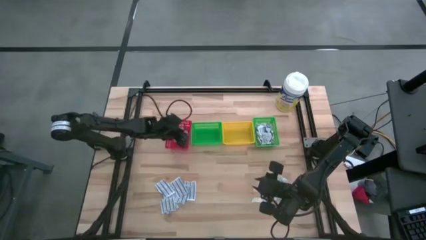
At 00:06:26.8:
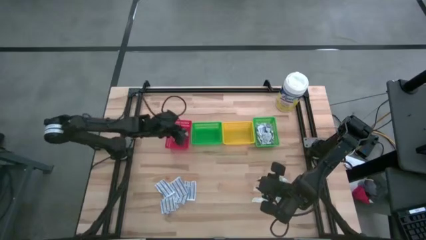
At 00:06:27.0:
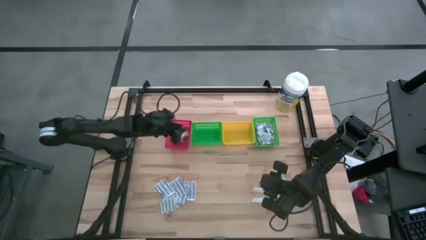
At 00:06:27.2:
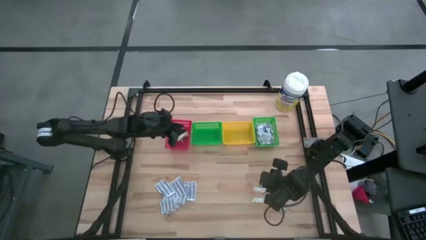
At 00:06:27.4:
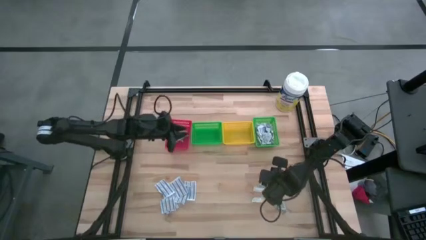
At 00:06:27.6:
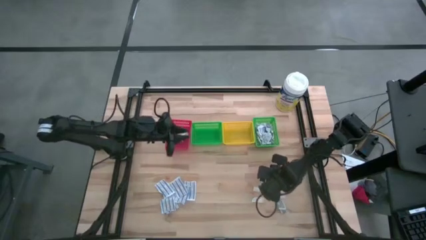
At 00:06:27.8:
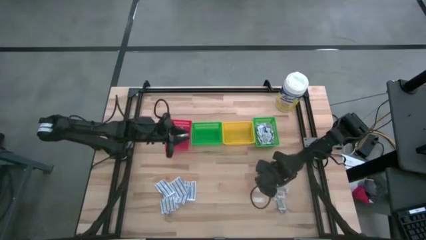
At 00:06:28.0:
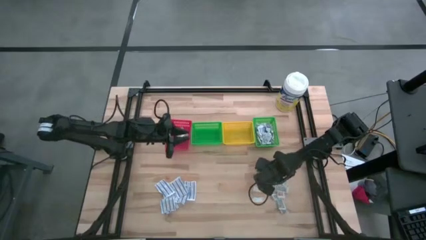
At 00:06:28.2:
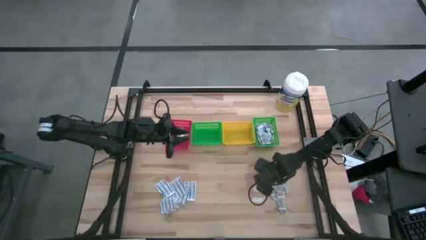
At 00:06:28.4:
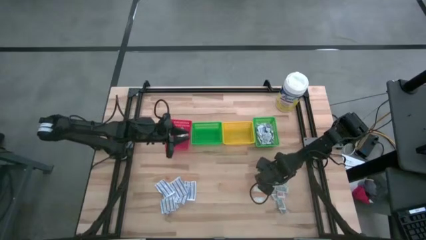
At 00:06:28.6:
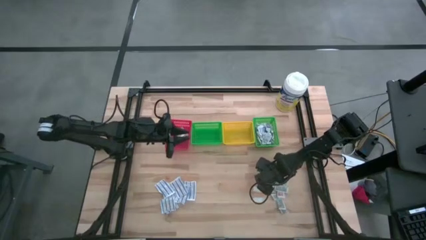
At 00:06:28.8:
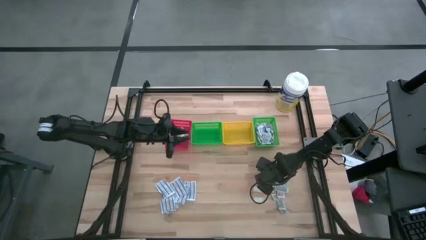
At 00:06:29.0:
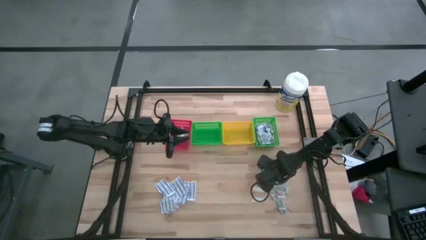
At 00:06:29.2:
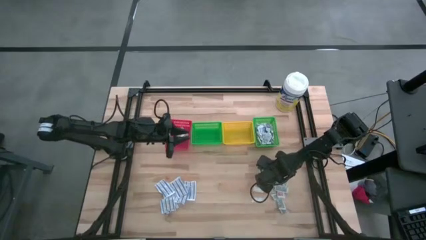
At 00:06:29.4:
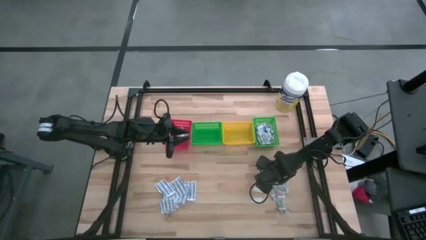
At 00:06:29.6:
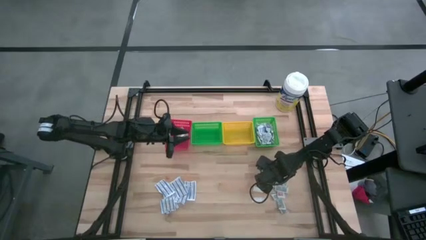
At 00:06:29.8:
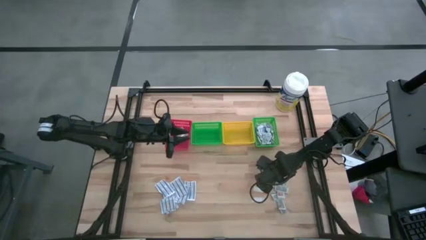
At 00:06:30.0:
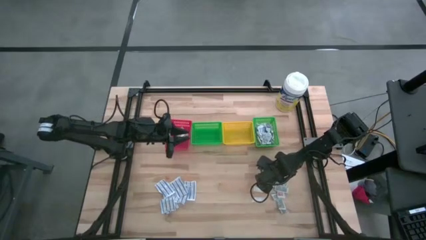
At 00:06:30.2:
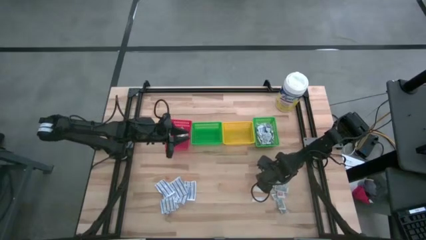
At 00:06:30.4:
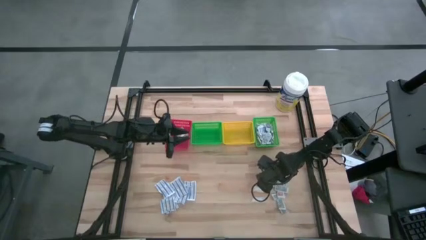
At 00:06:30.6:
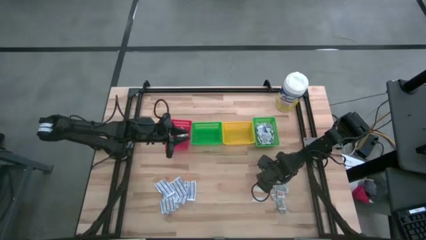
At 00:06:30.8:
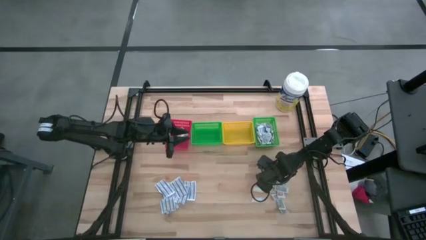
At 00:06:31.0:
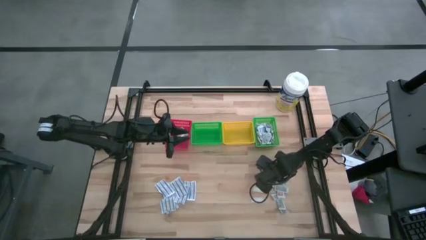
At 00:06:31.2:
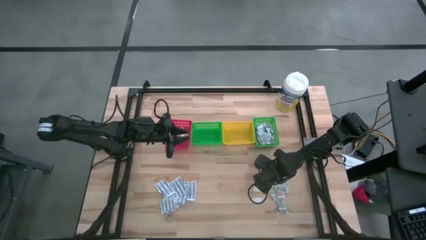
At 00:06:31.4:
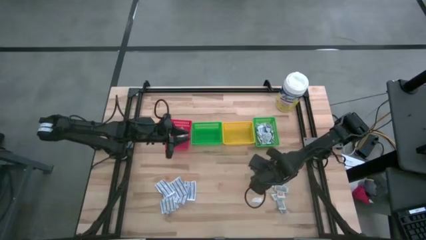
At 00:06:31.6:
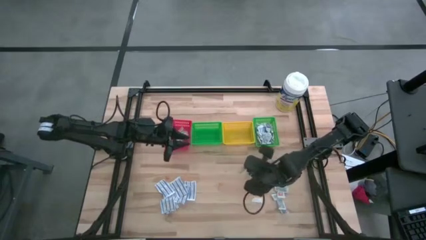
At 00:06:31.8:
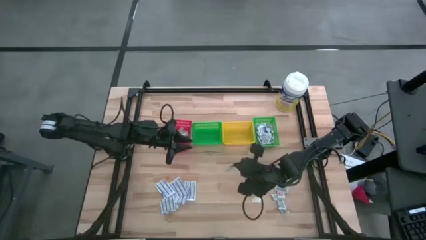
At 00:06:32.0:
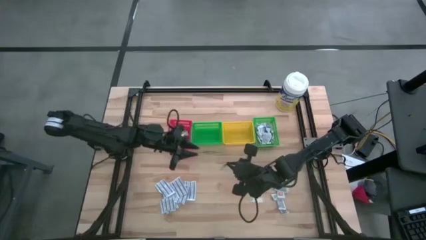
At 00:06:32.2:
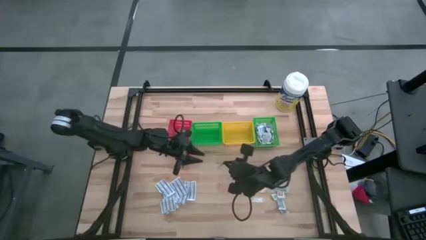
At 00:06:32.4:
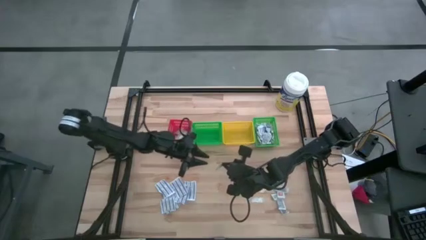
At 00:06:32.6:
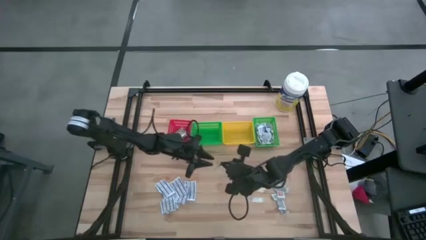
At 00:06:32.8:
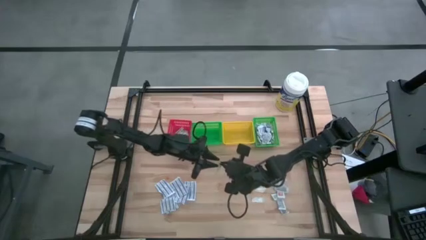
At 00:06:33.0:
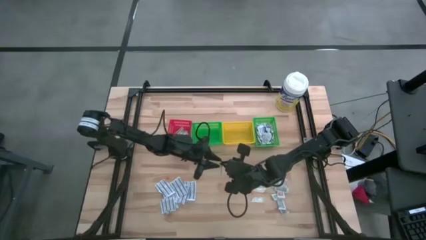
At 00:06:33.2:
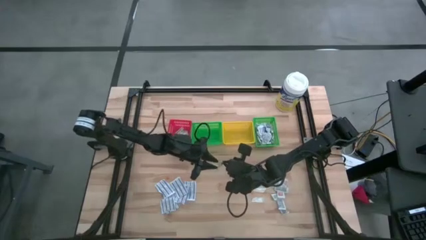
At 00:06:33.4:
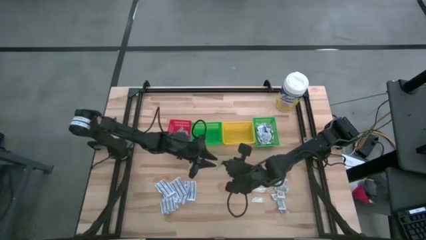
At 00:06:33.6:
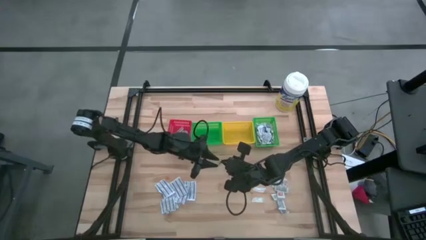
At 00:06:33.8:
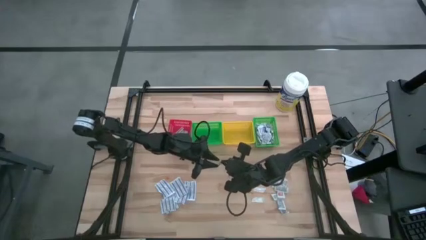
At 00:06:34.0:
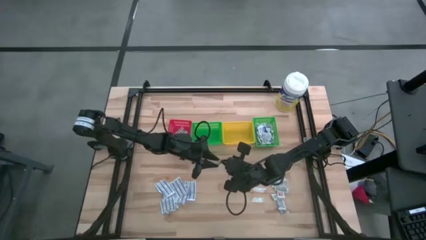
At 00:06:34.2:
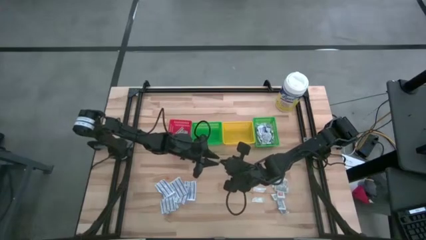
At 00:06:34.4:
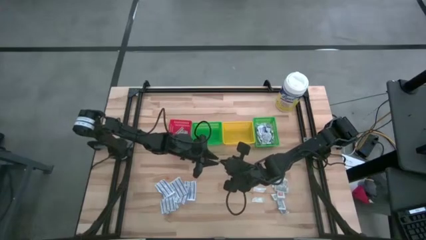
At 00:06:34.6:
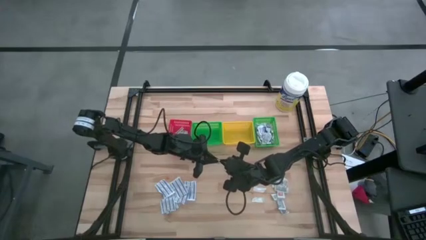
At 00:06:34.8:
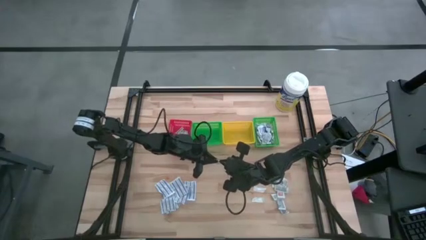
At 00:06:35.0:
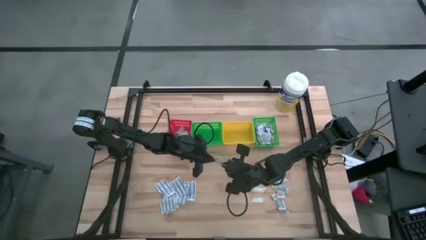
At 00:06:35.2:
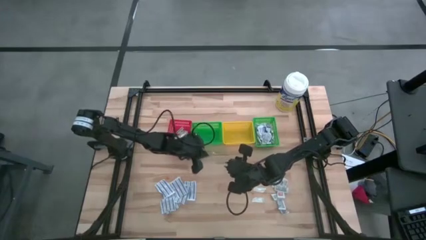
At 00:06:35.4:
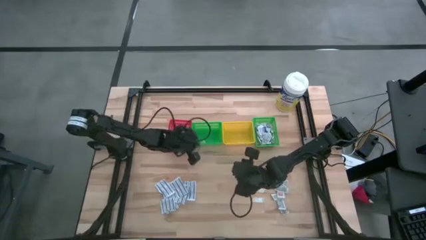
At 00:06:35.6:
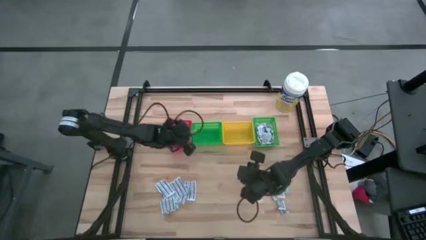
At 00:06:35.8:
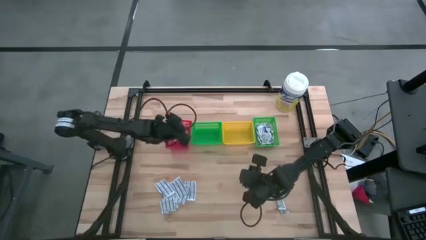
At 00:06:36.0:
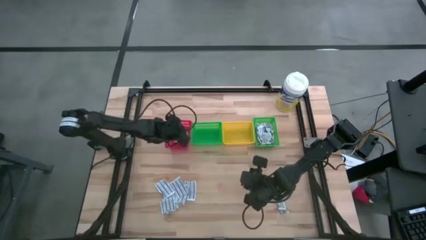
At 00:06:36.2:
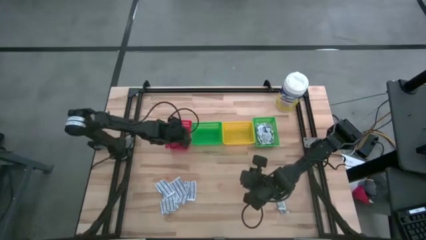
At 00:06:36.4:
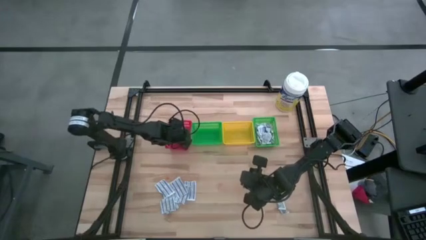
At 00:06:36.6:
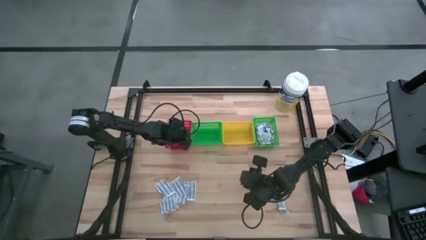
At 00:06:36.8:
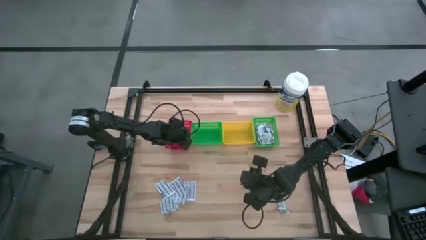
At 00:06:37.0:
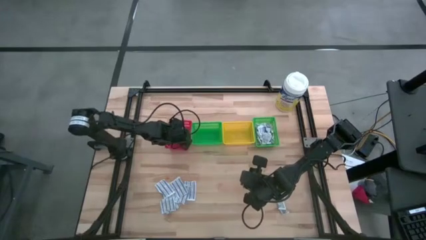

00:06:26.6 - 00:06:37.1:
Task: Pick & Place First Aid Supplies
Put the green bandage into the red bin
